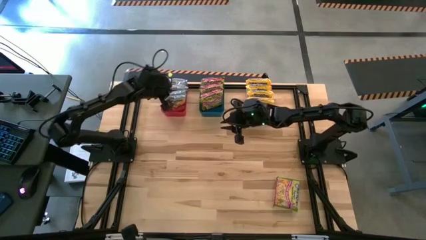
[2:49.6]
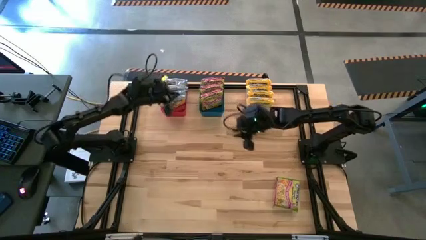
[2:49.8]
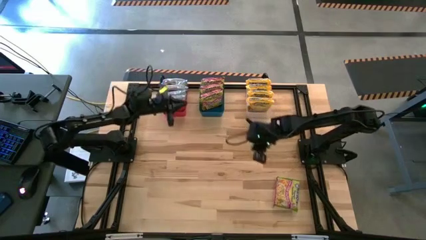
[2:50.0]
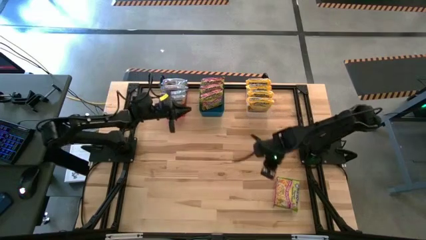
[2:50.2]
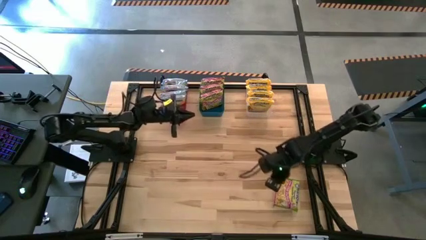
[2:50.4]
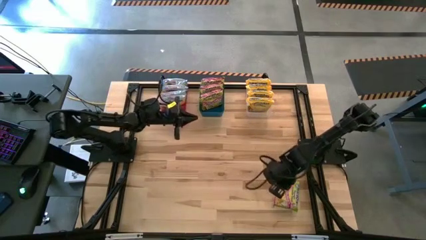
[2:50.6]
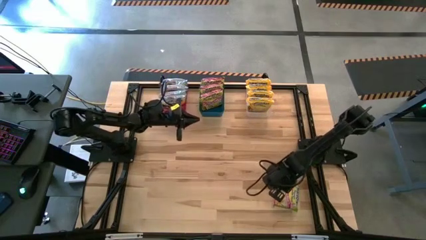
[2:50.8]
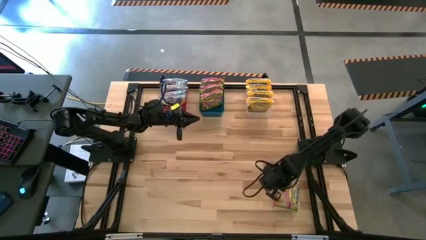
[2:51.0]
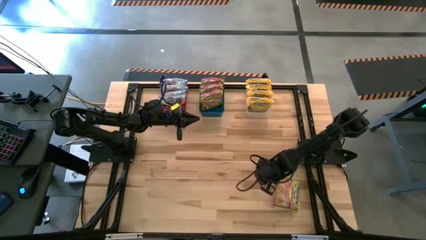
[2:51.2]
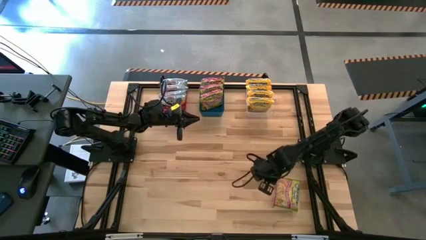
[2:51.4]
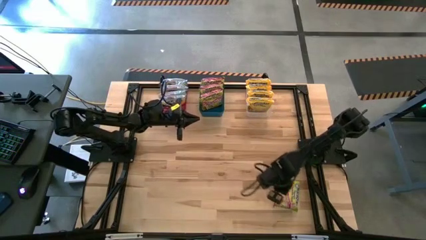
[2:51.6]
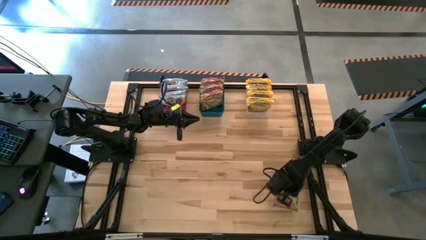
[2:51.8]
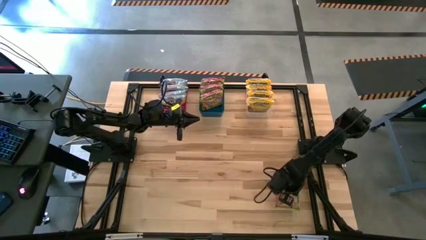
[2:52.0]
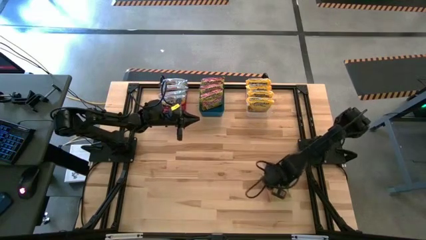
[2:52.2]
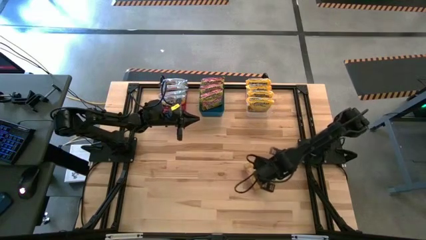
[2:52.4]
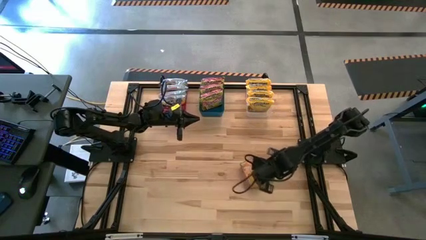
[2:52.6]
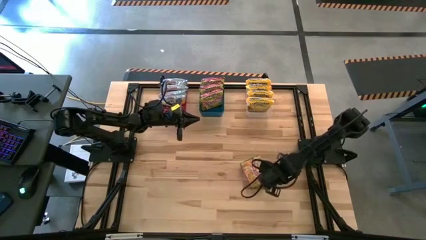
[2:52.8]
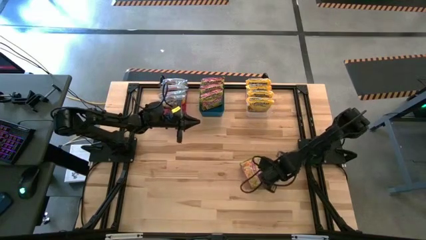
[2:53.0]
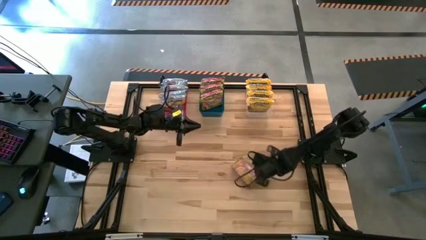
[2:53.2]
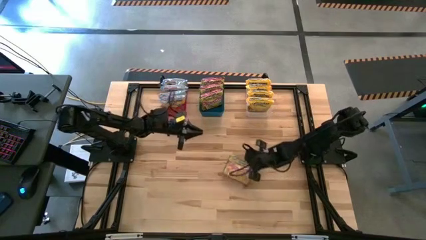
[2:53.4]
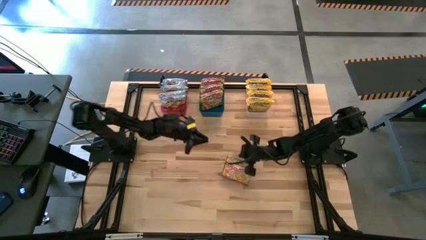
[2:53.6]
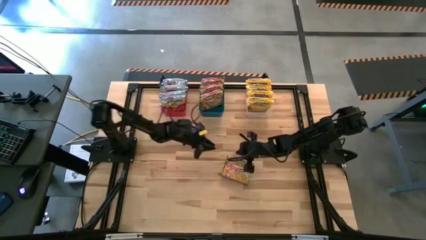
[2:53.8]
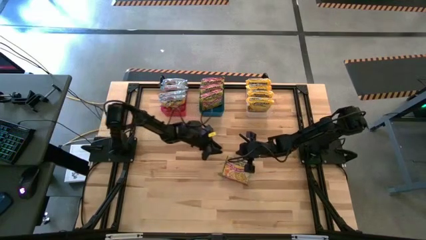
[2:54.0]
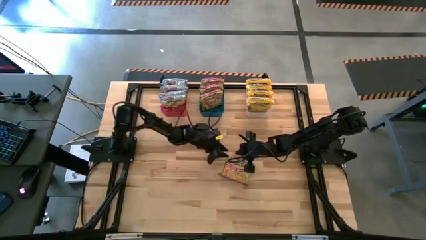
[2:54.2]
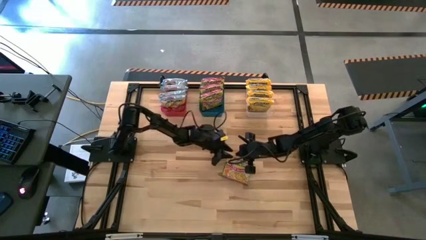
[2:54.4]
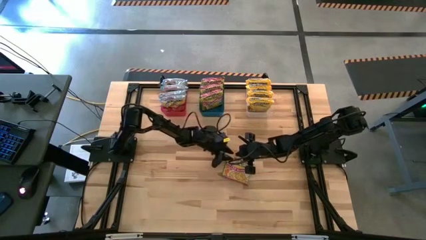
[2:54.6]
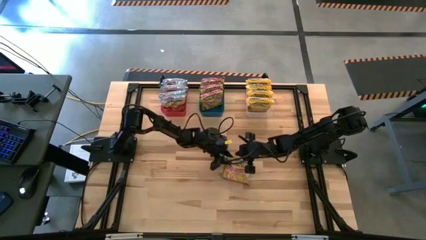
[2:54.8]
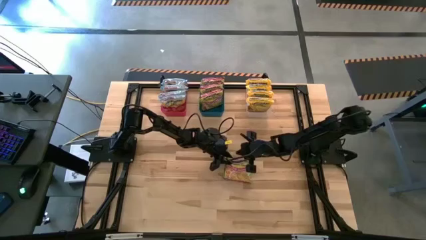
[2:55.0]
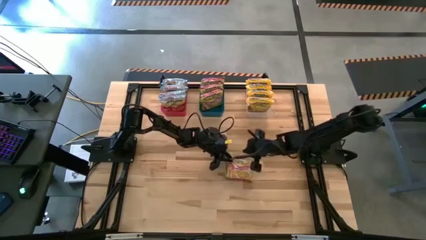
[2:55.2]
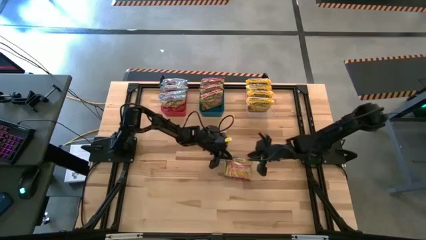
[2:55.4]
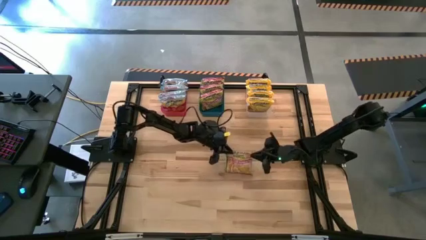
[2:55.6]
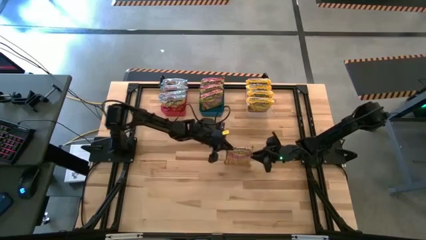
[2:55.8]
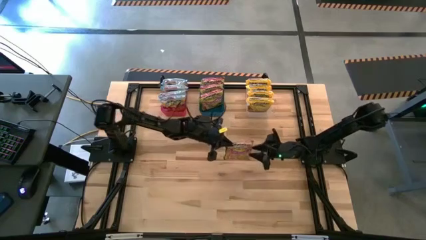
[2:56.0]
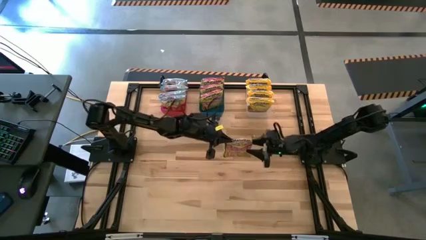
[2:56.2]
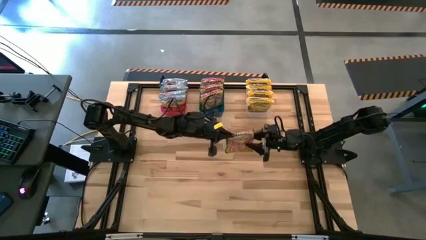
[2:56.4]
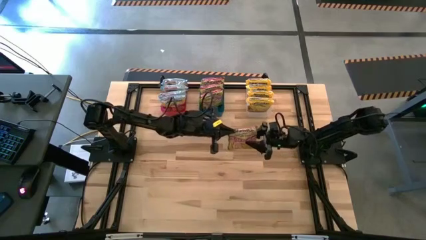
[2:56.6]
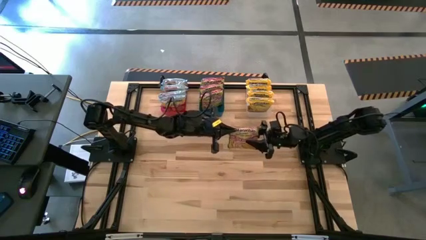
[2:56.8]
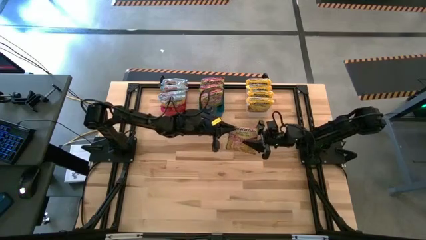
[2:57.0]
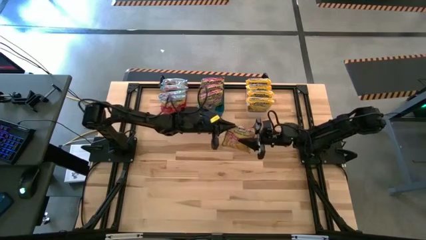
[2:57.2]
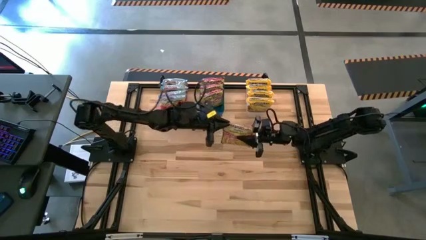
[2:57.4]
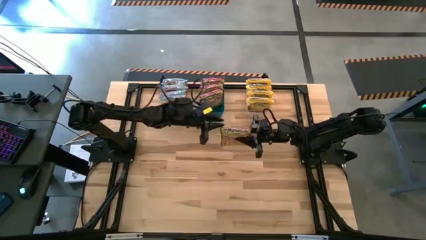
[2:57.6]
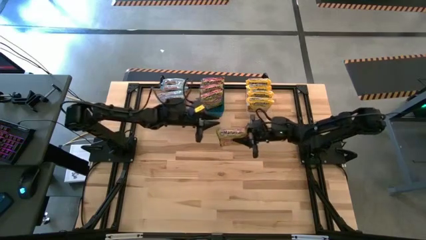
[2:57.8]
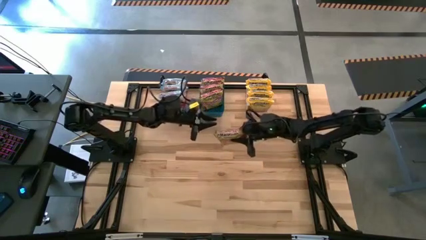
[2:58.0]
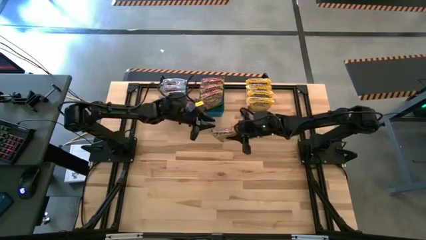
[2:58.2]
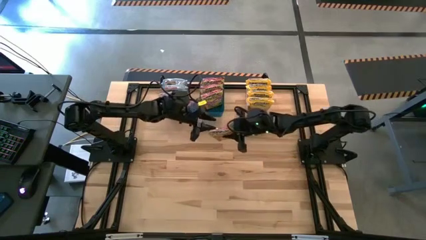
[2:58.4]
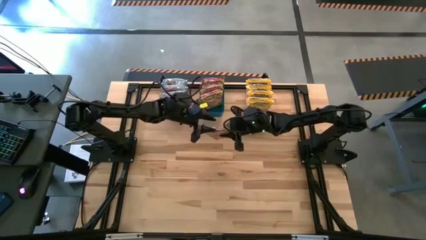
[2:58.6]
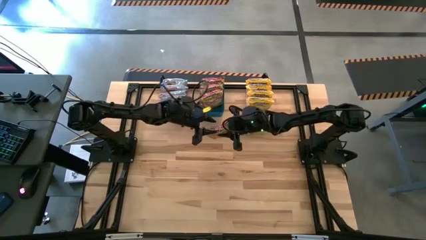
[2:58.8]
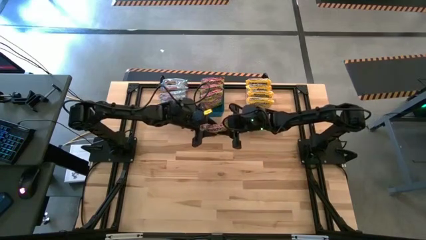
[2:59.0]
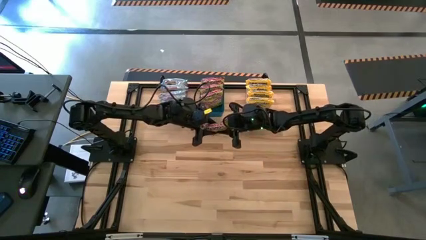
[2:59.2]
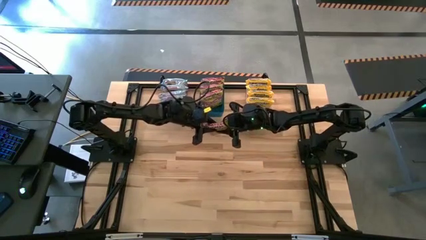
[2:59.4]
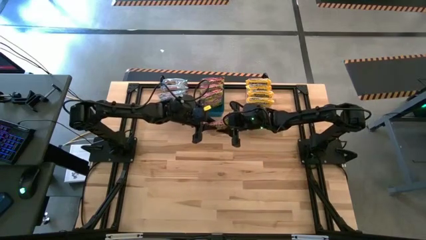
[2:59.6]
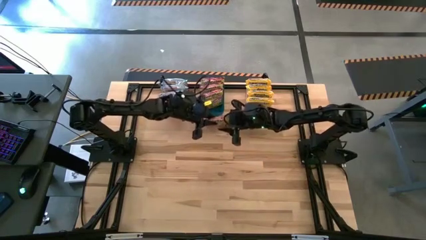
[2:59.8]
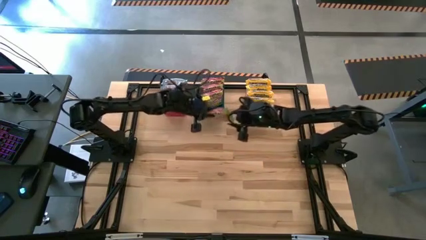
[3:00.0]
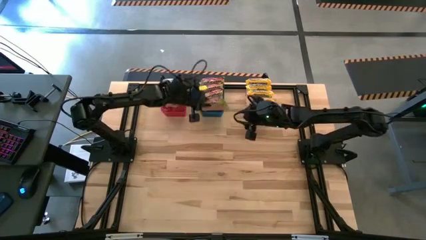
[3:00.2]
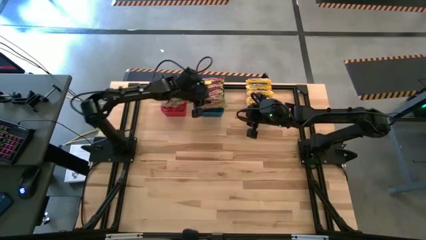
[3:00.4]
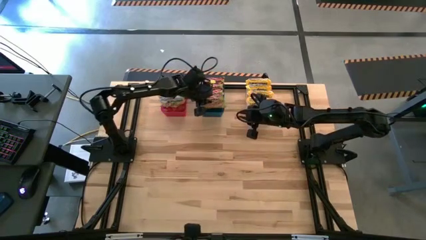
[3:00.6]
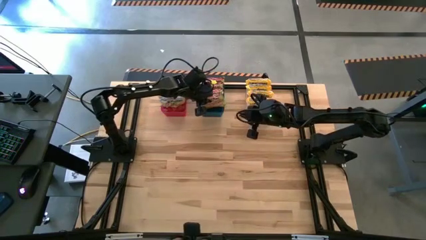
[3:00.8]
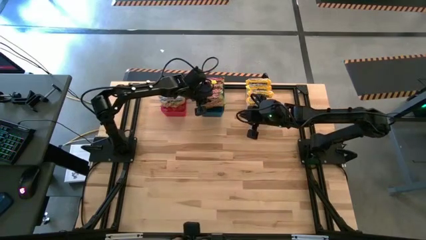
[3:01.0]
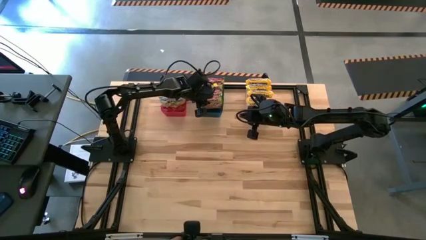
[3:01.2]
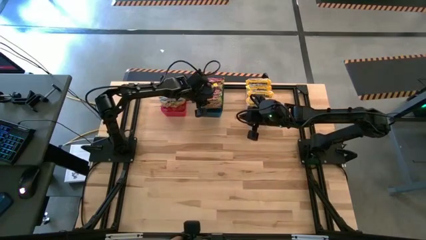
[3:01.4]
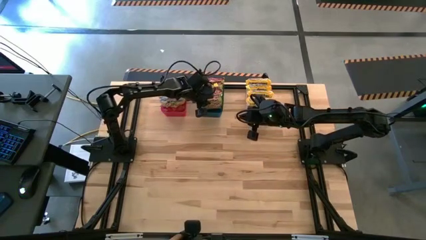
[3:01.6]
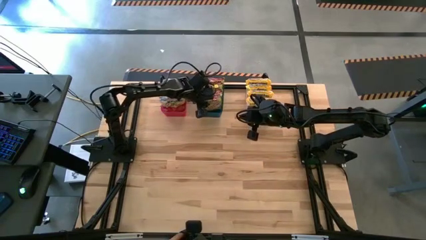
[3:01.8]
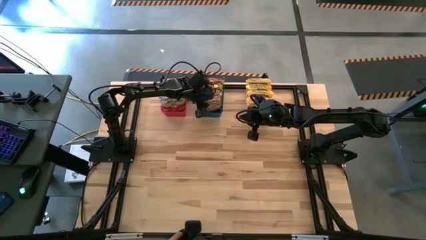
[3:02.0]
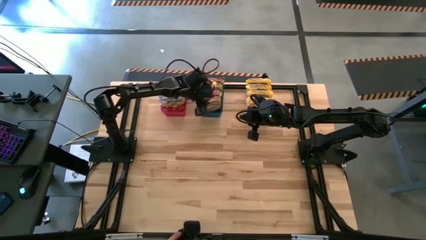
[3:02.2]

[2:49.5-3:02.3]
Task: Sort Maruchan noodles
Put the green noodle pack into the blue bin
